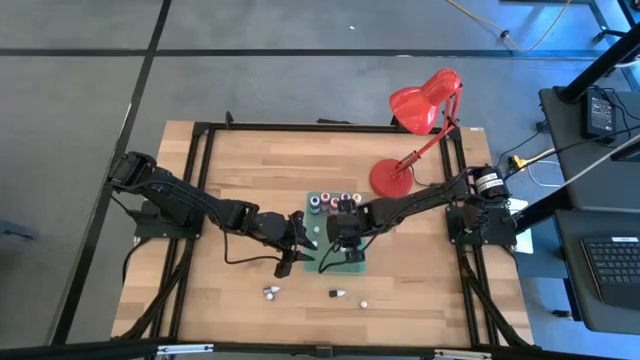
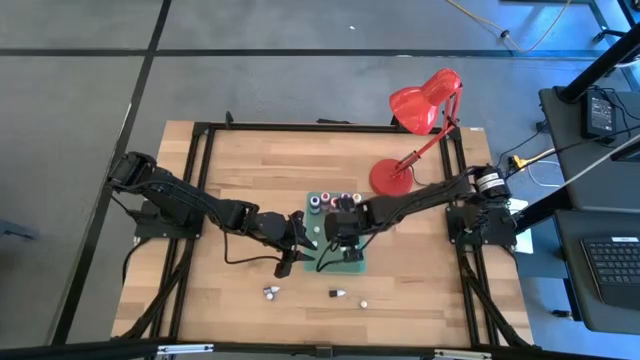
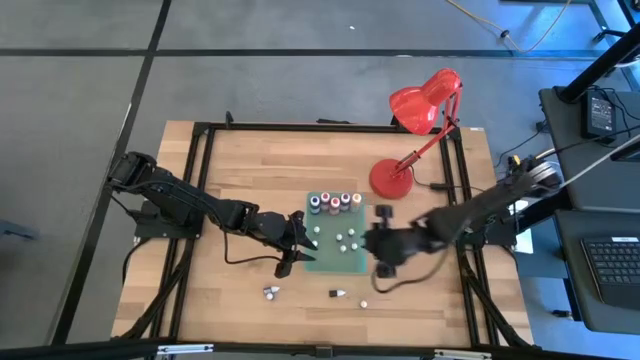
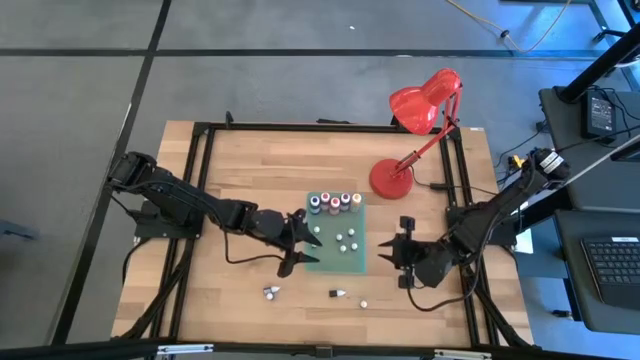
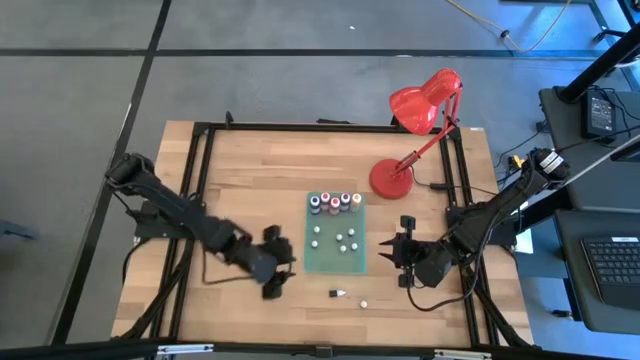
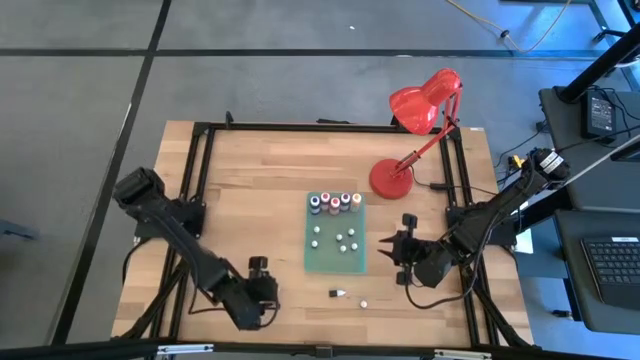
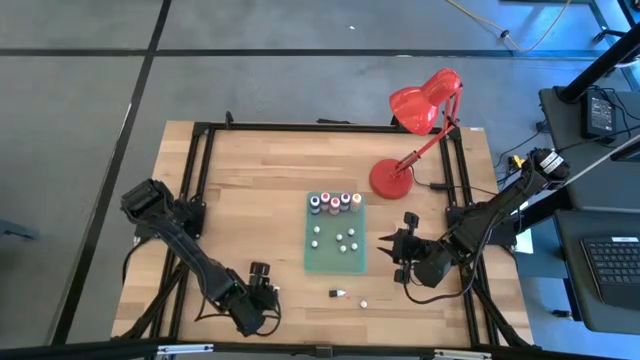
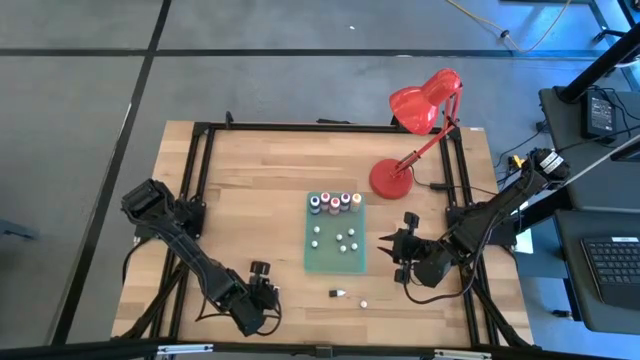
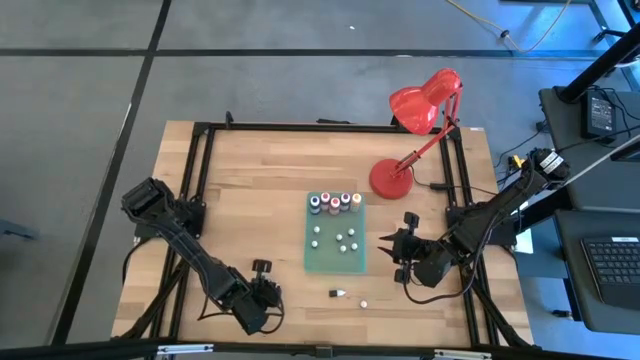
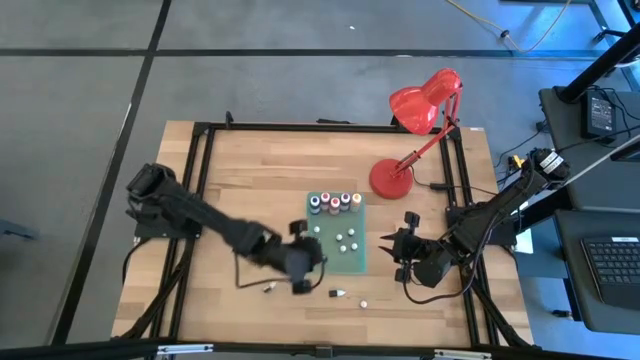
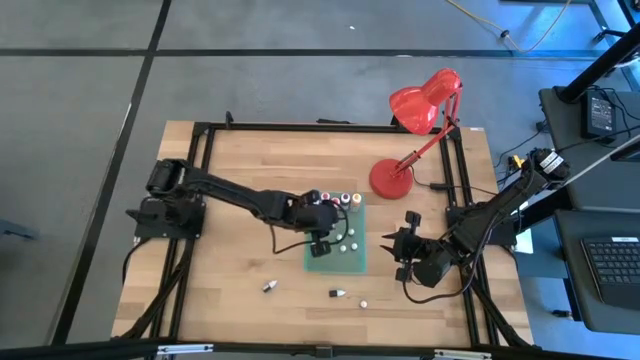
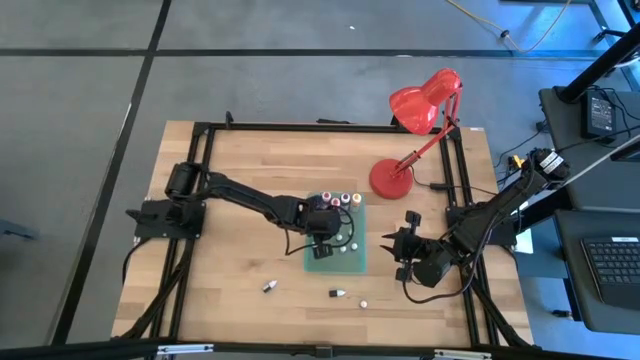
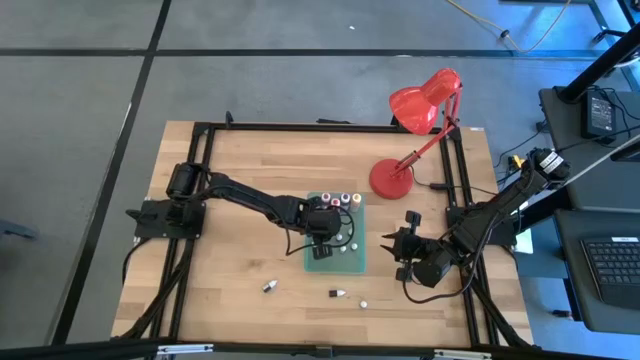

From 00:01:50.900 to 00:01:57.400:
Task: Pick & Place food coloring
Put the left small black food coloring bottle into the green bin

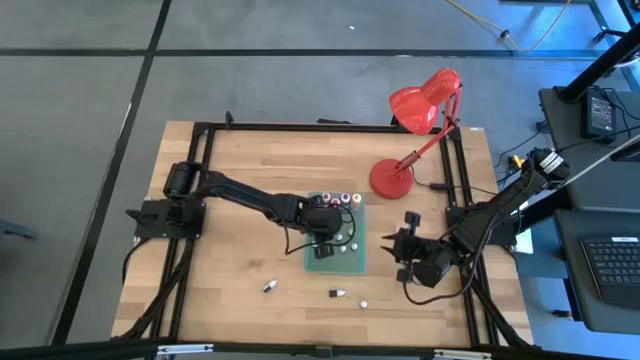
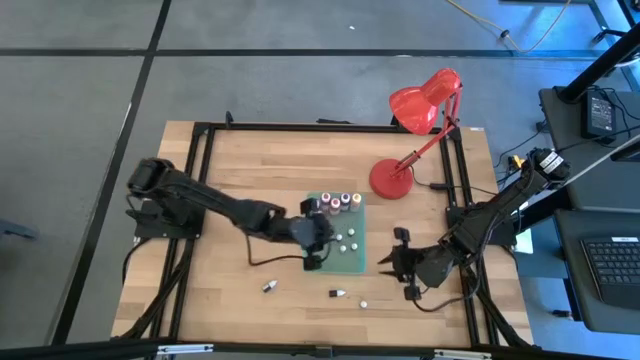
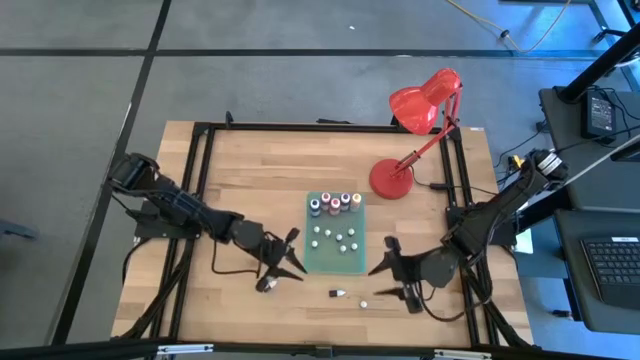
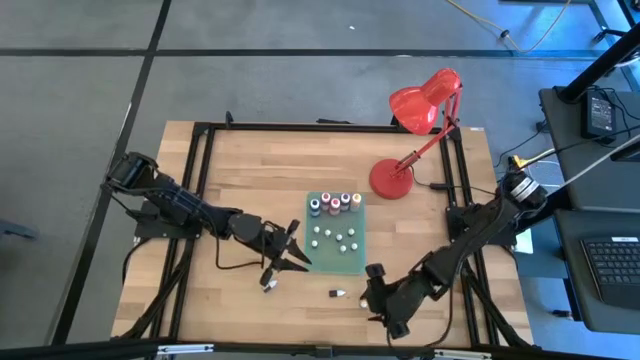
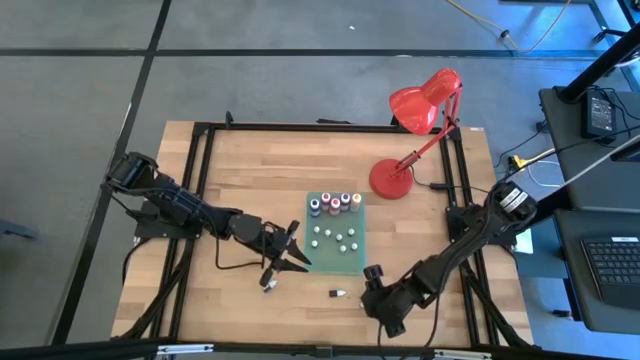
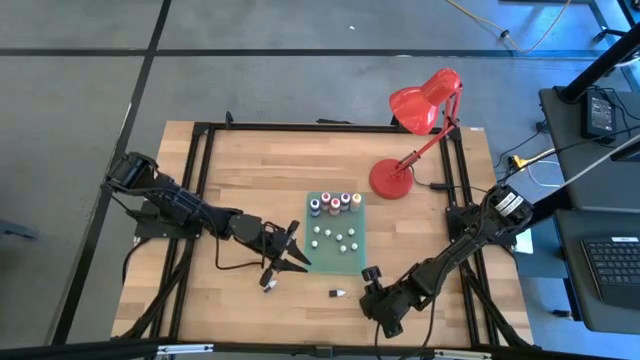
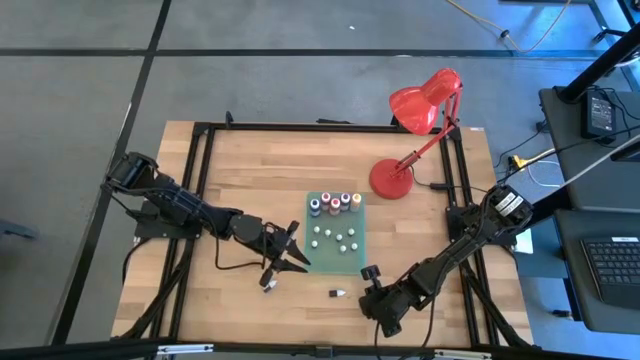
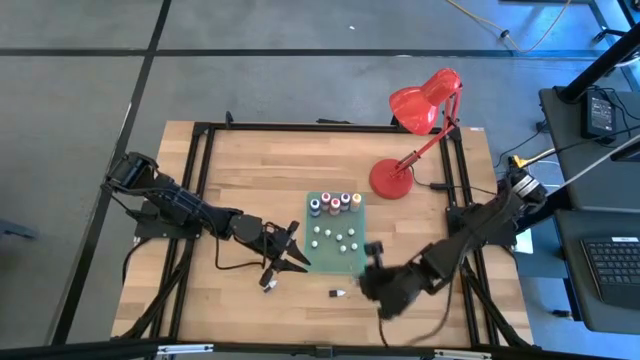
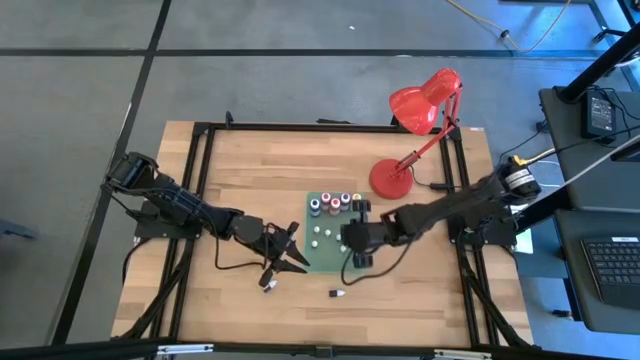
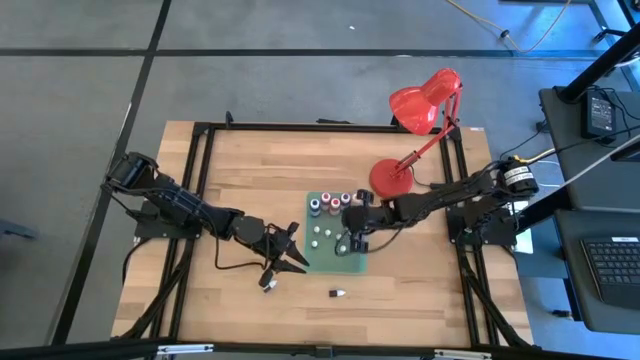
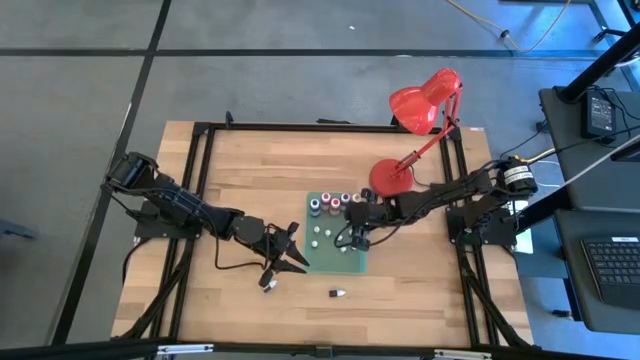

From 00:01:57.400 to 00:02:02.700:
Put the small black food coloring bottle into the green bin

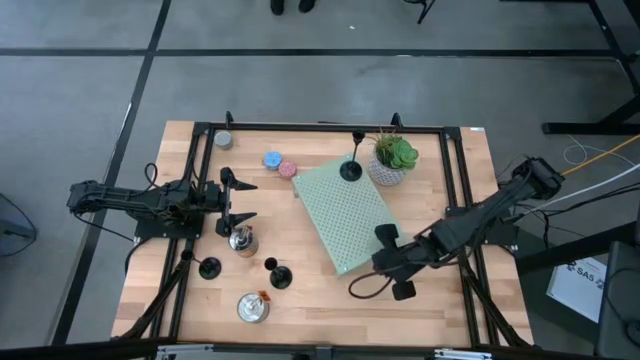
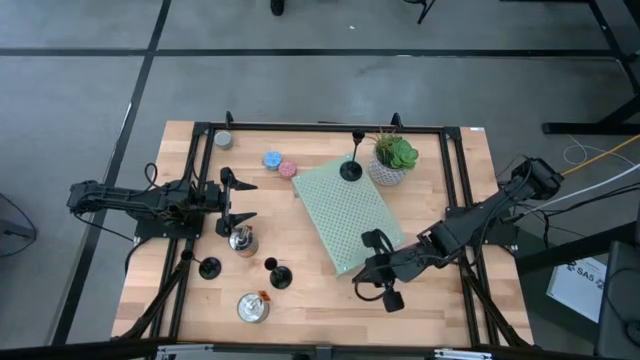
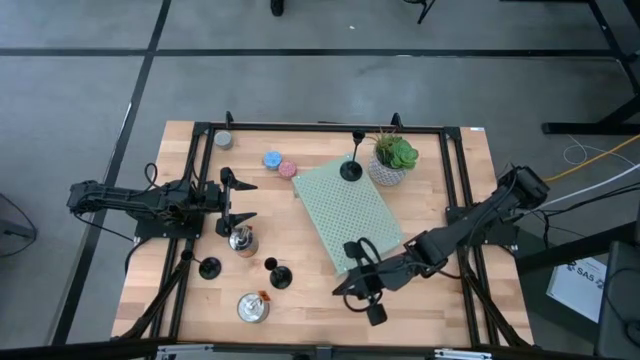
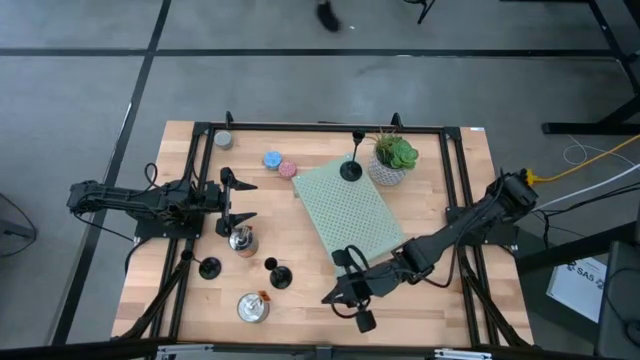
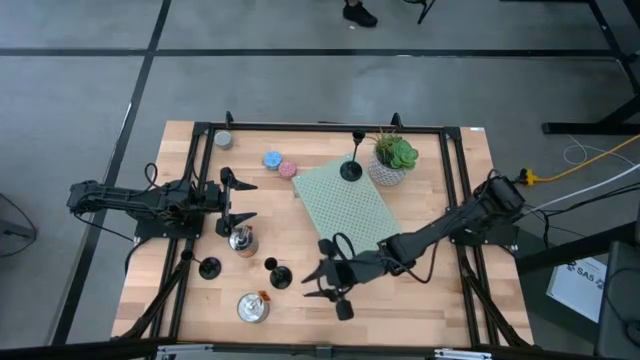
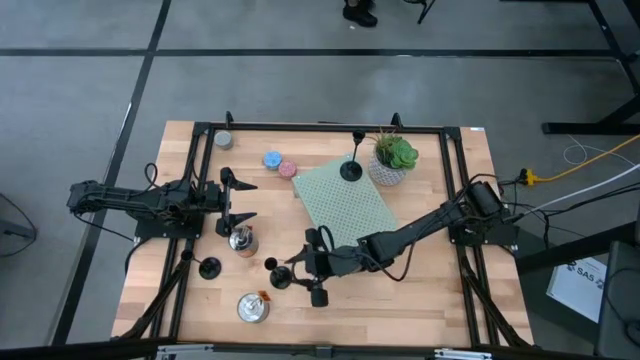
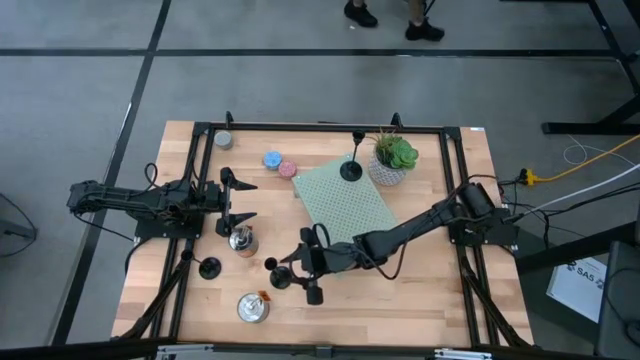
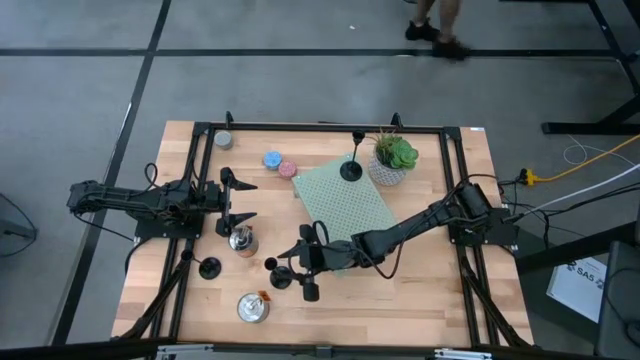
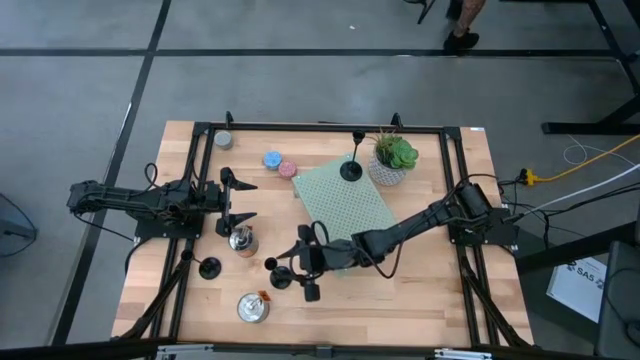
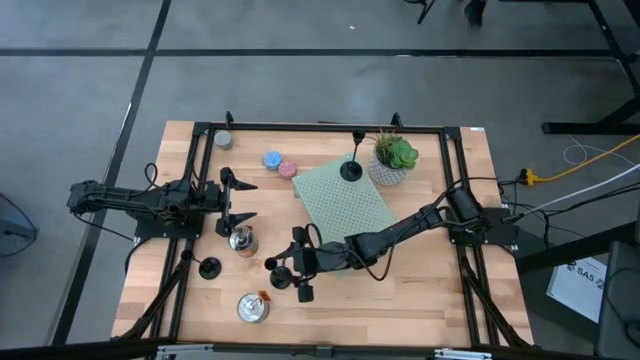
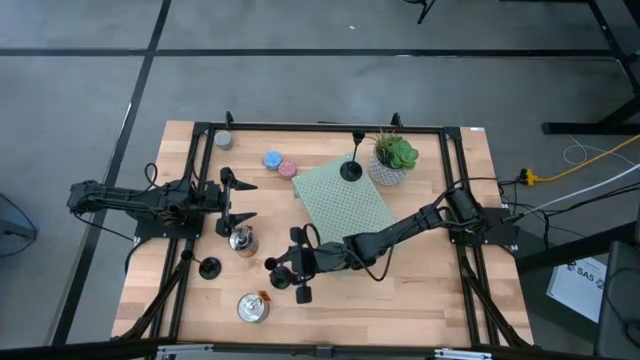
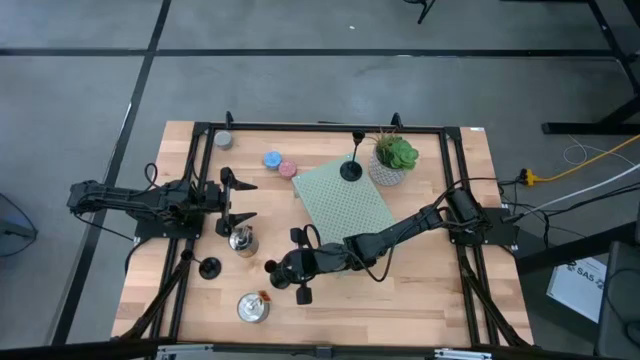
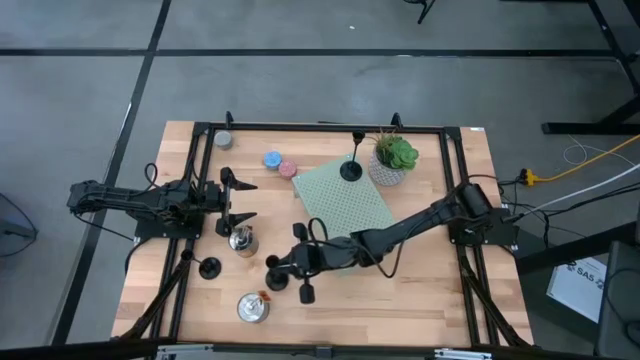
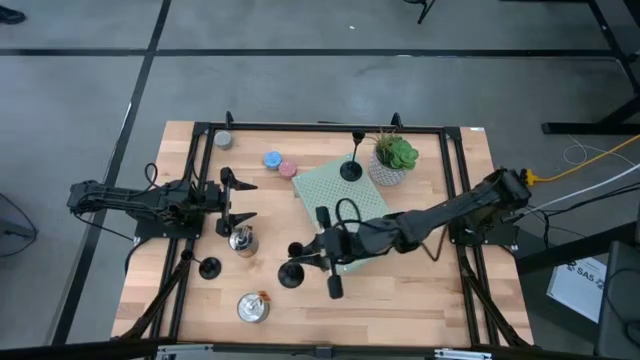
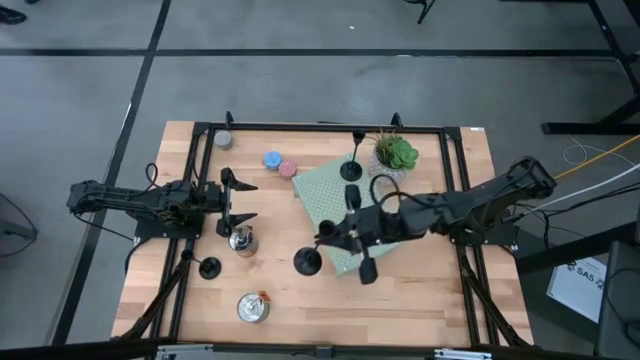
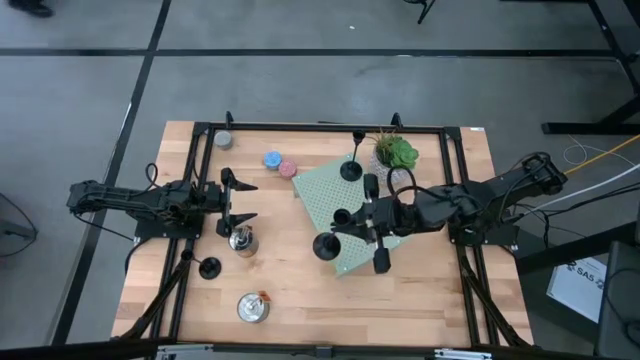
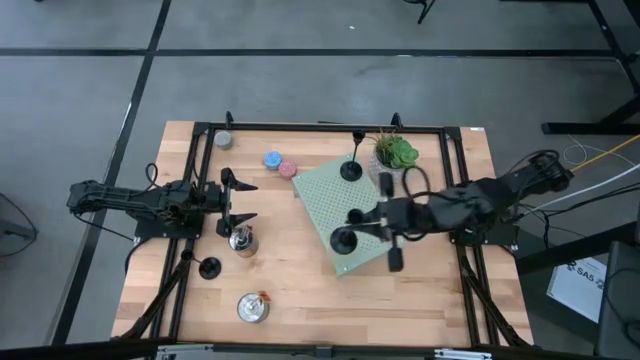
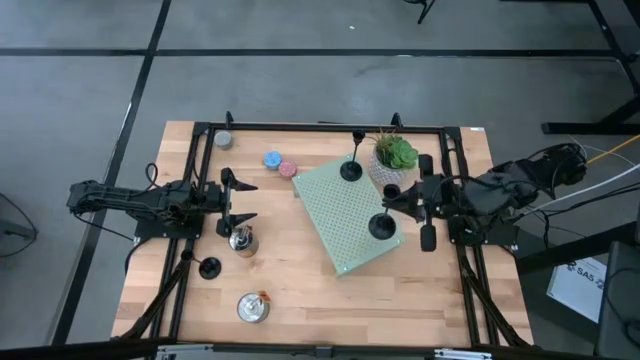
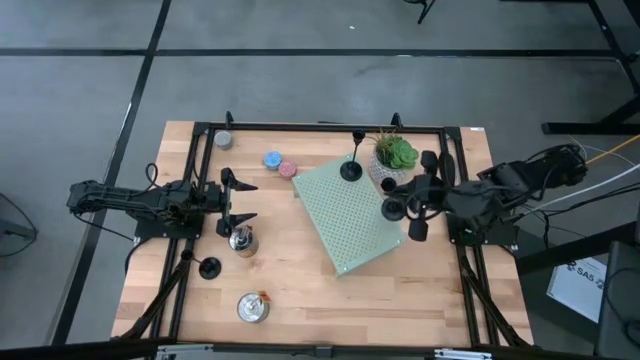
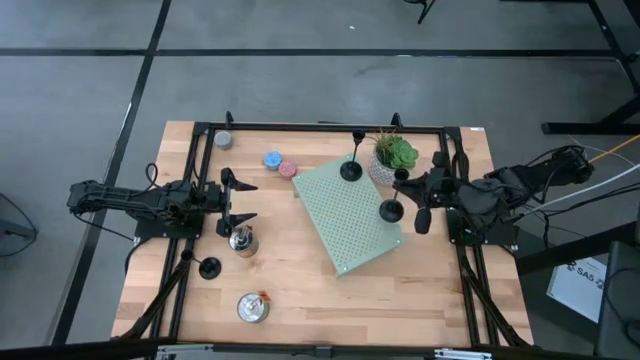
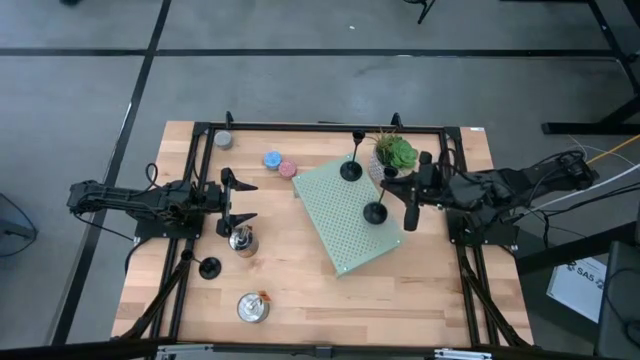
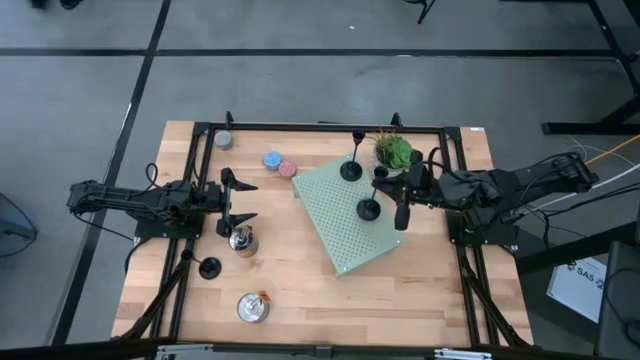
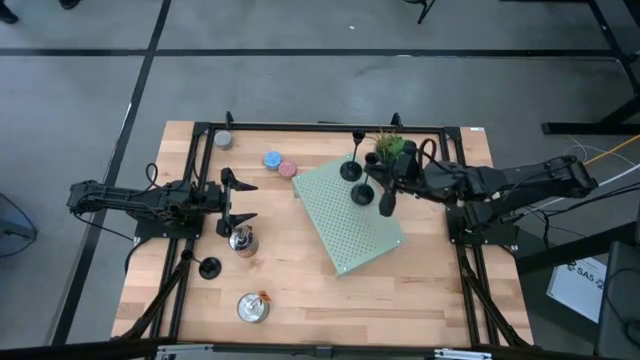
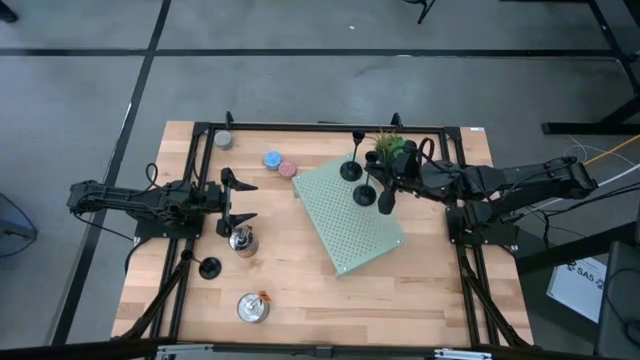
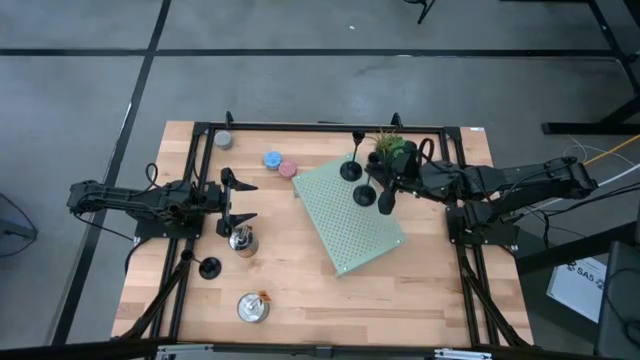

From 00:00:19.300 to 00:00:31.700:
Task: Pick & Place candle stick holders
Put the right black candle holder on the shelf aligned with the other candle holder
